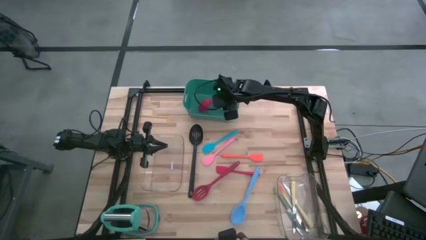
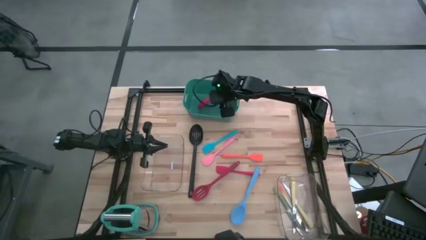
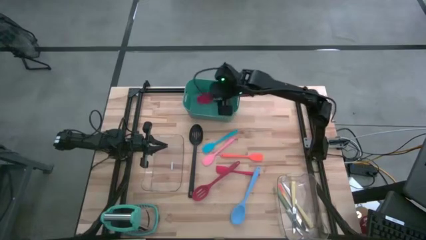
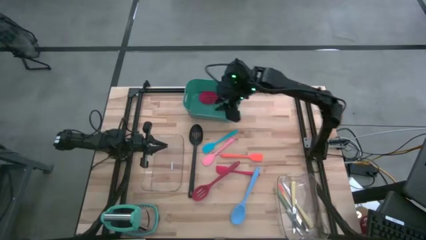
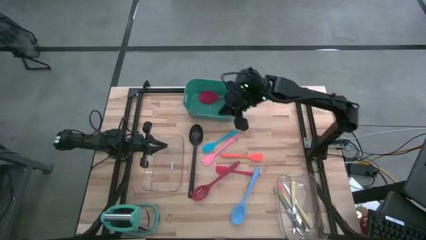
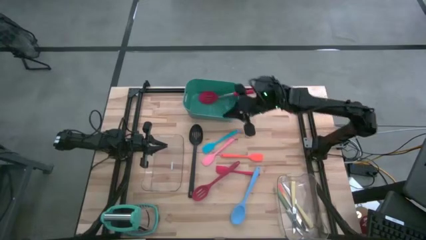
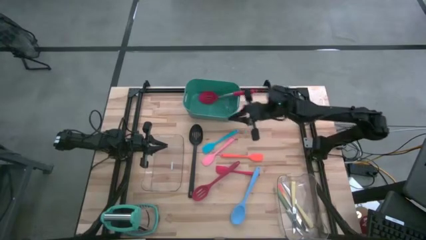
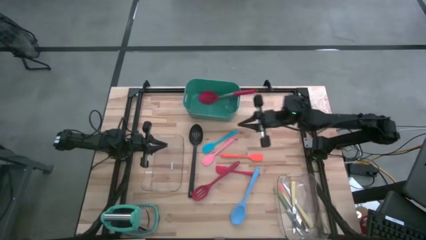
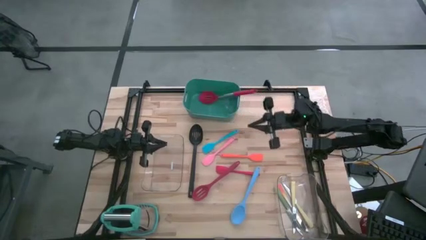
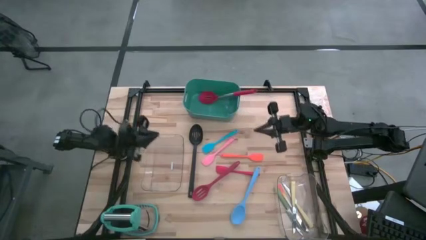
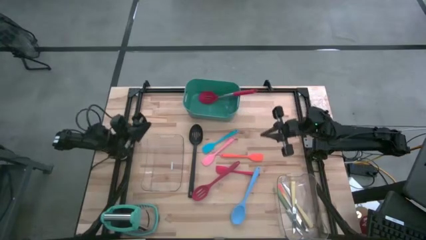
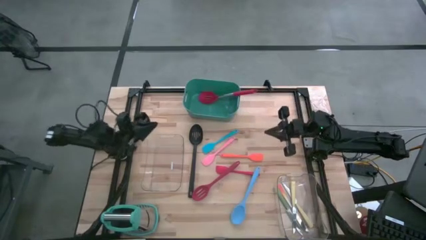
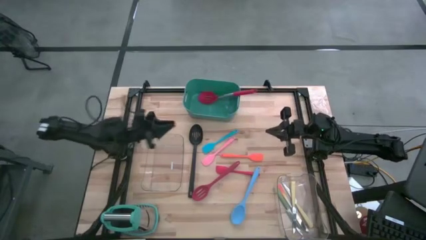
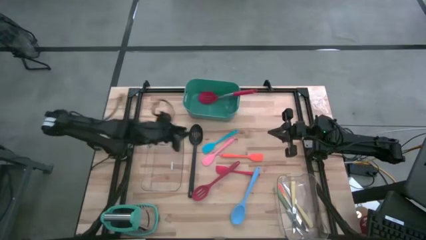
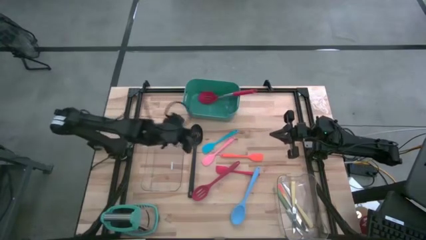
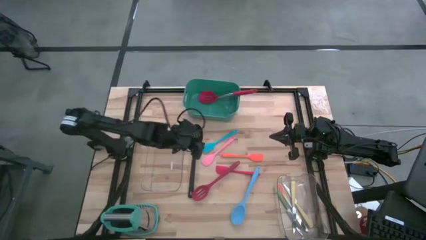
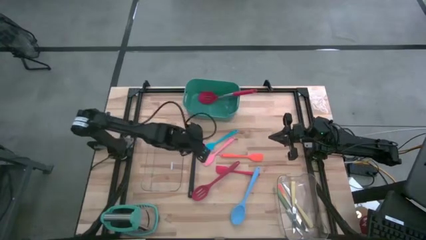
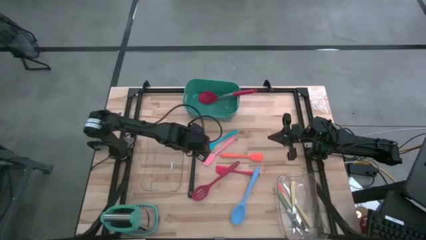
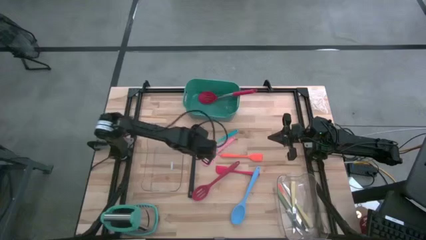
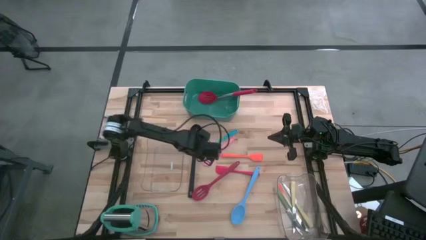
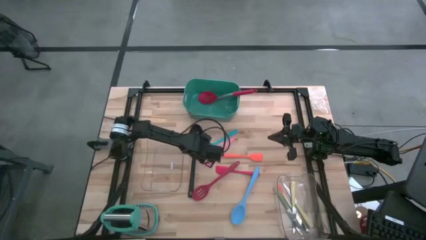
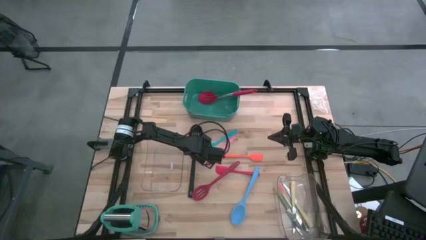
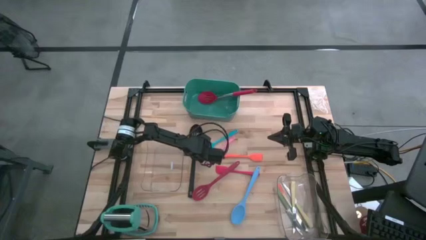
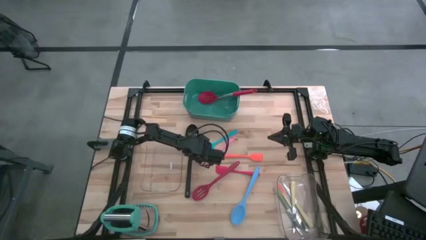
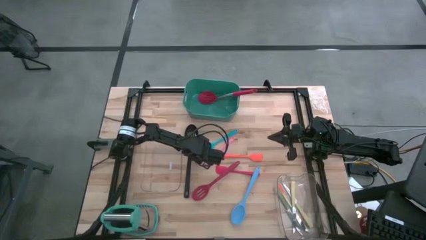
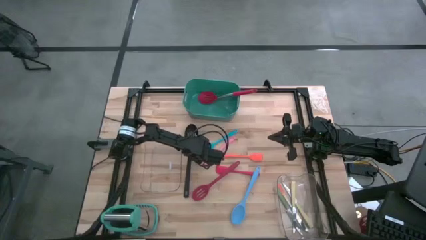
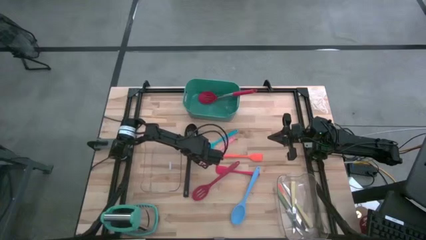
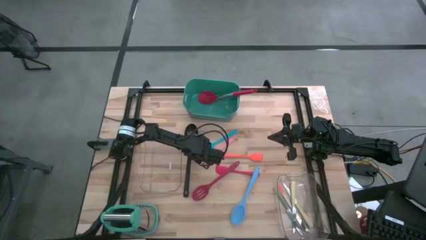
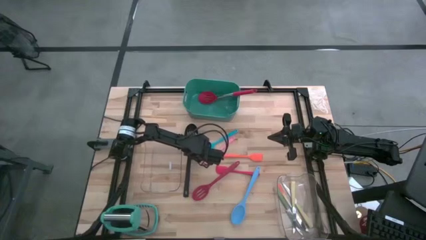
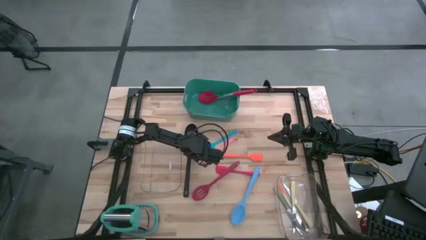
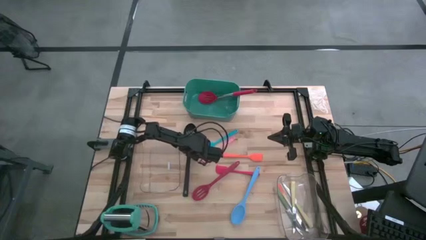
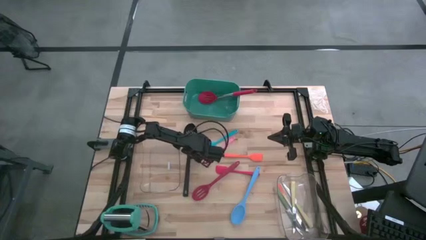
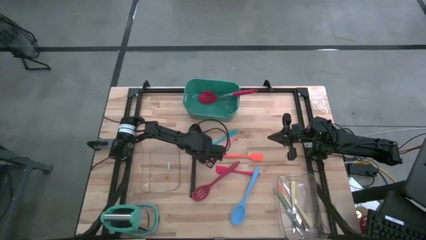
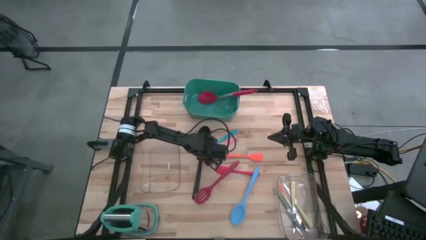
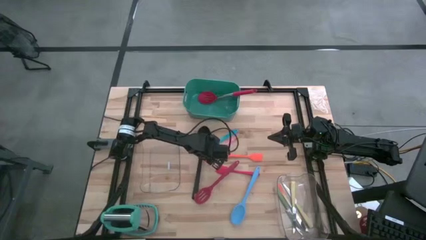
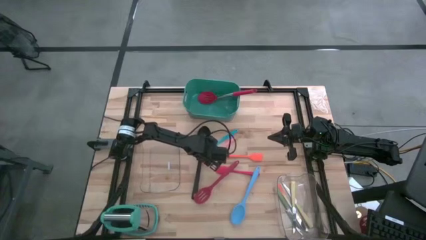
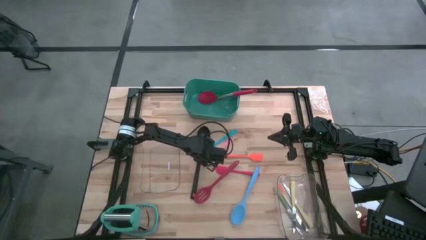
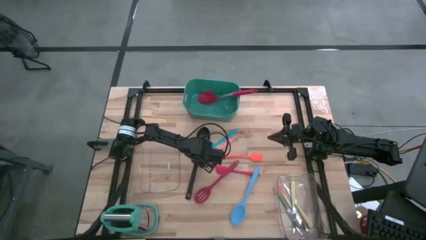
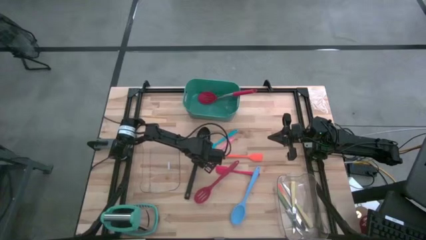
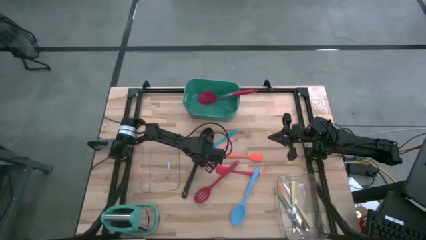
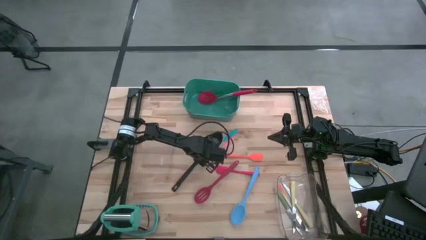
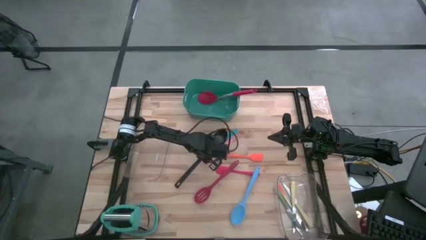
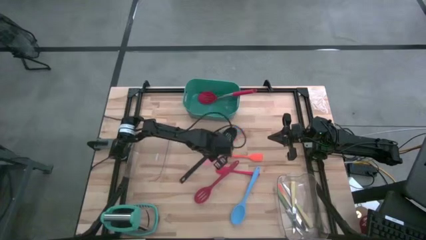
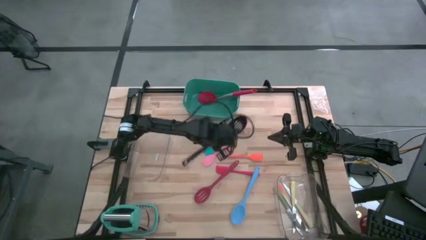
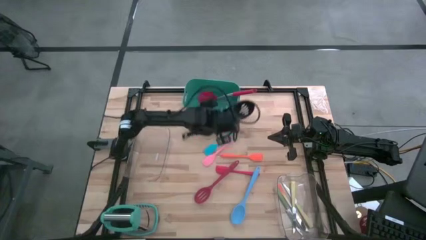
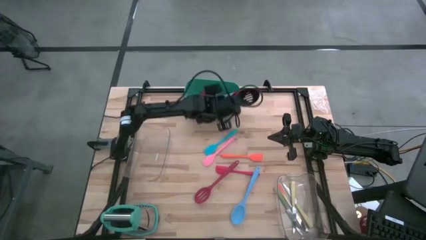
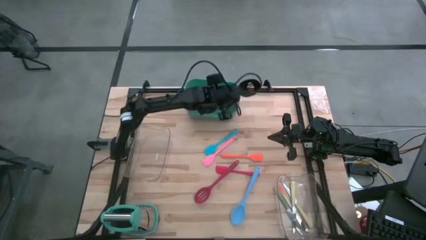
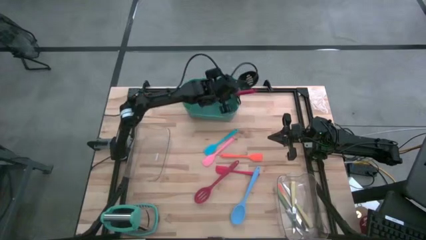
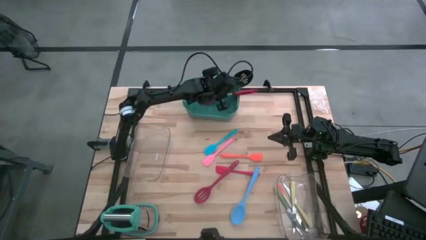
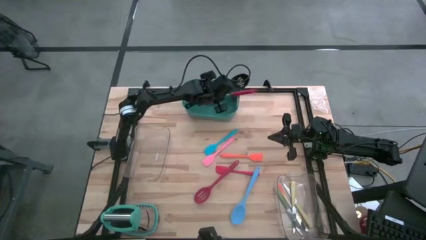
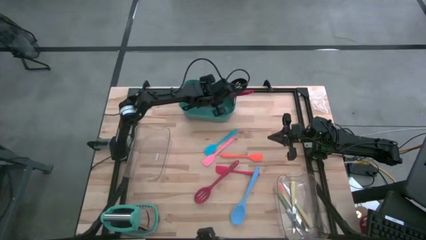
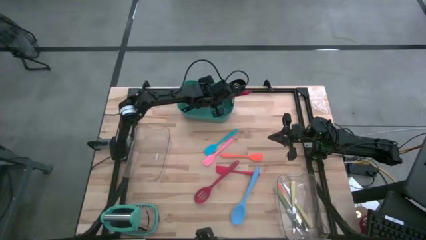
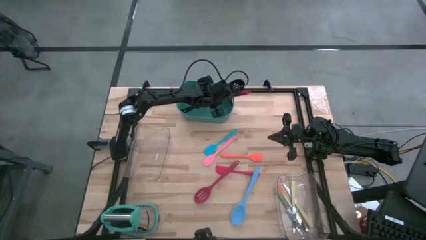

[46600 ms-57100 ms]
Task: Pick & Place Kitchen Items
Put the black slotted spoon into the green bin

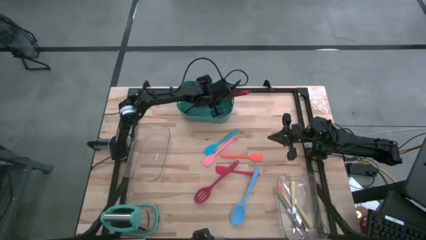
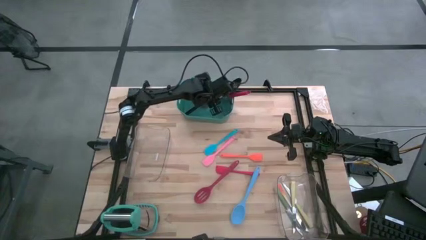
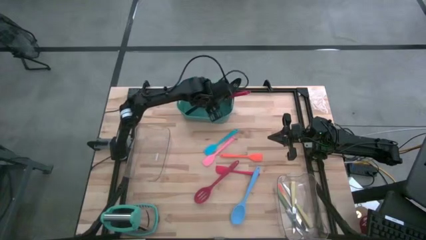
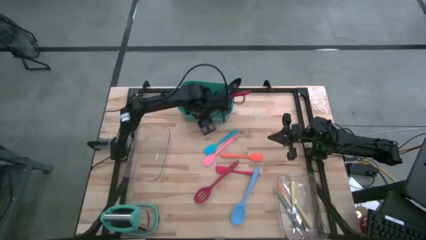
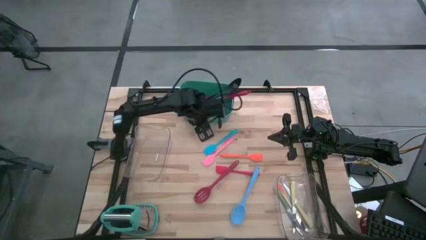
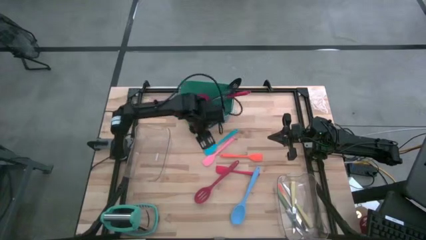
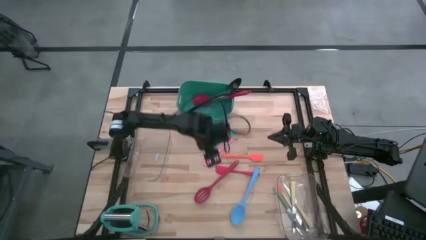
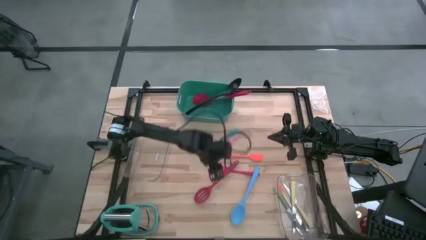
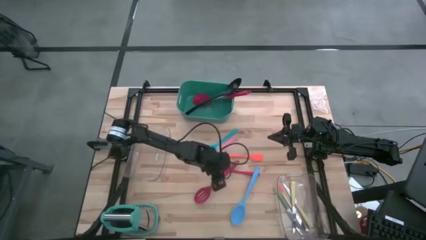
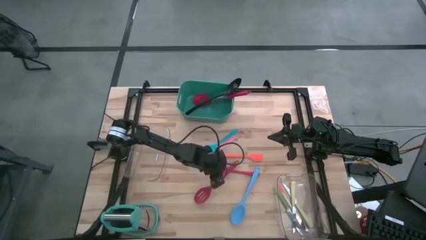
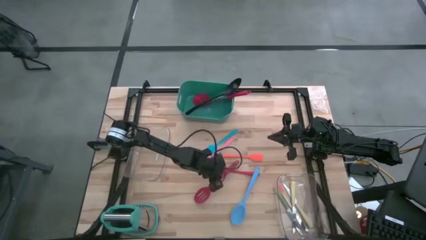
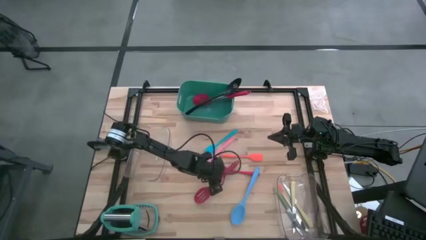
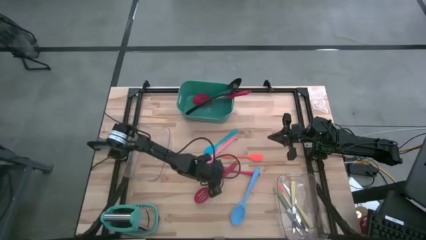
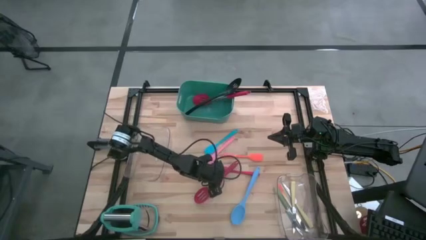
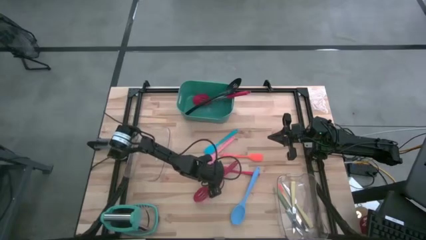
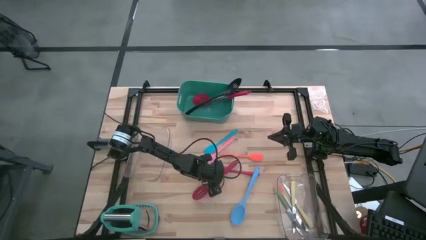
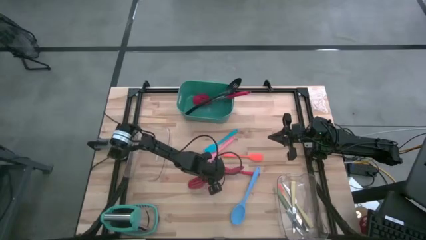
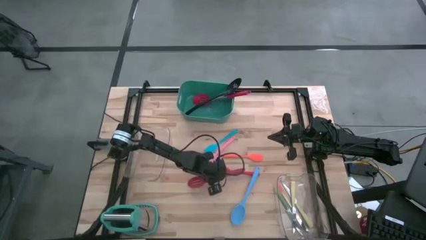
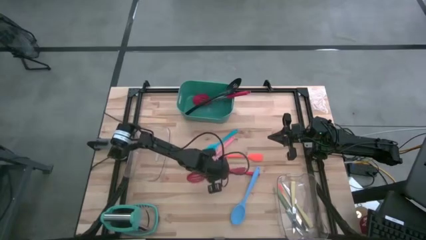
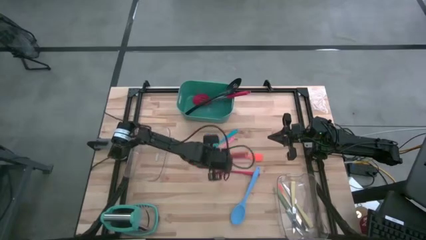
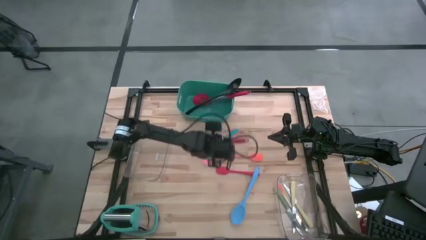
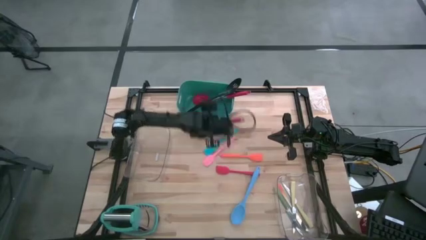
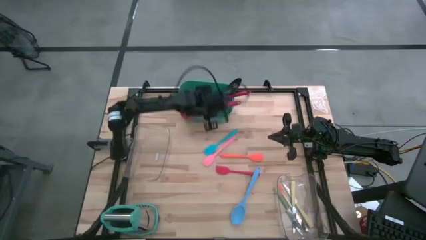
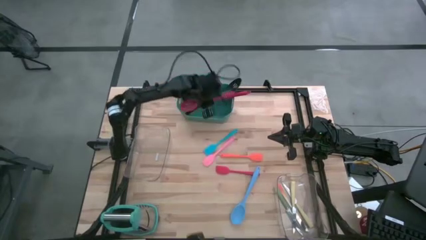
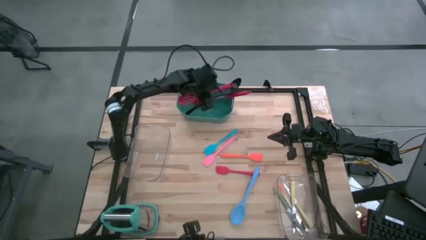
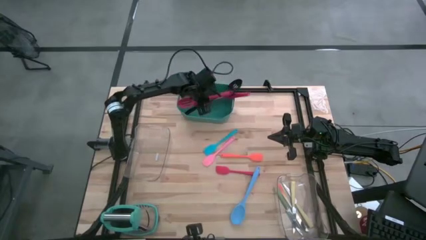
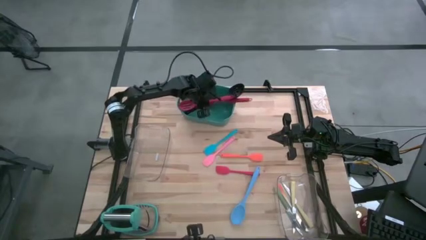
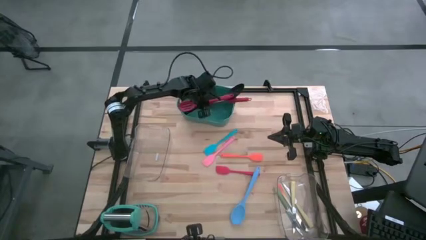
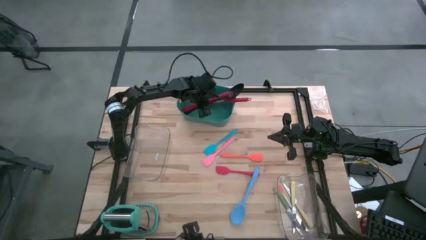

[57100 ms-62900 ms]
Put the red slotted spoon into the green bin
